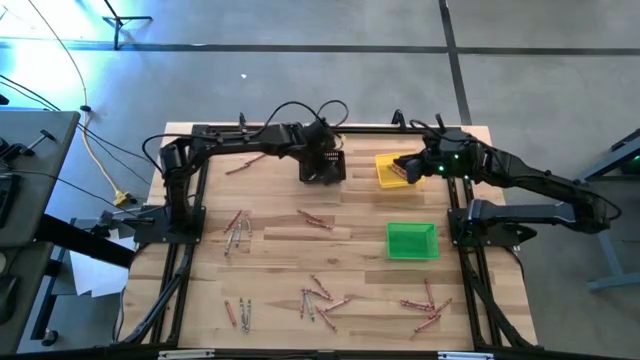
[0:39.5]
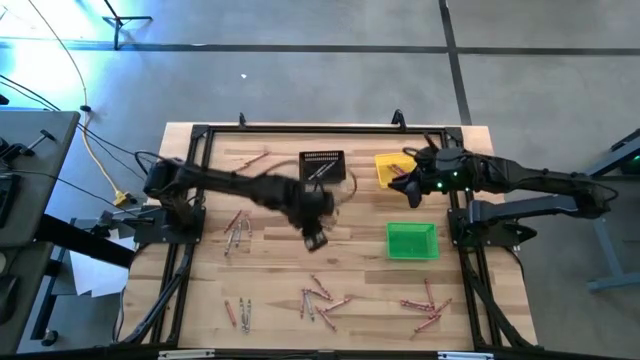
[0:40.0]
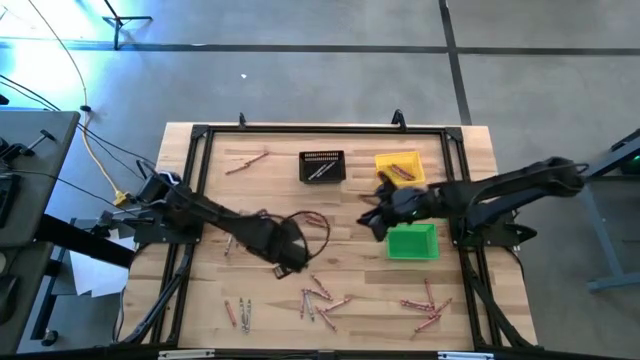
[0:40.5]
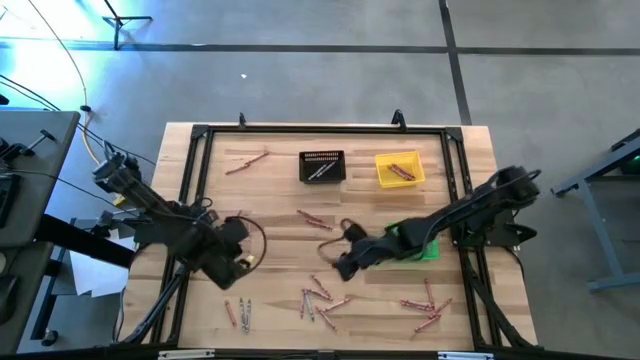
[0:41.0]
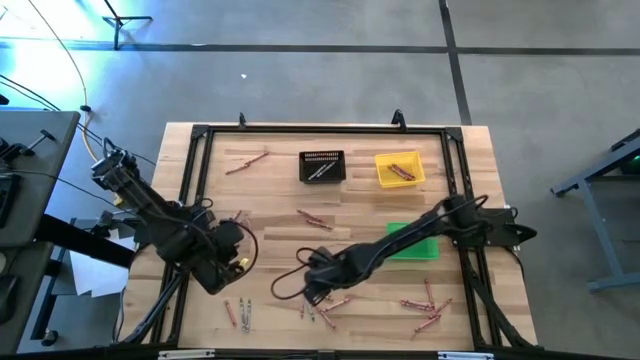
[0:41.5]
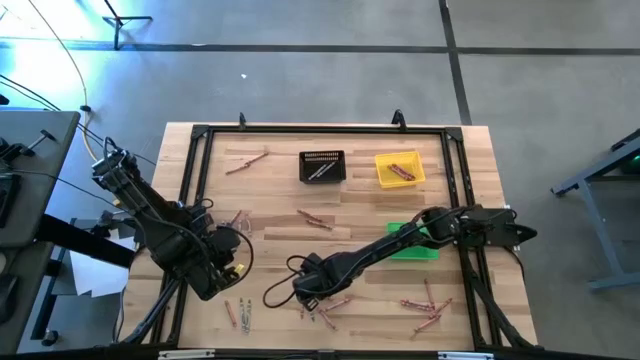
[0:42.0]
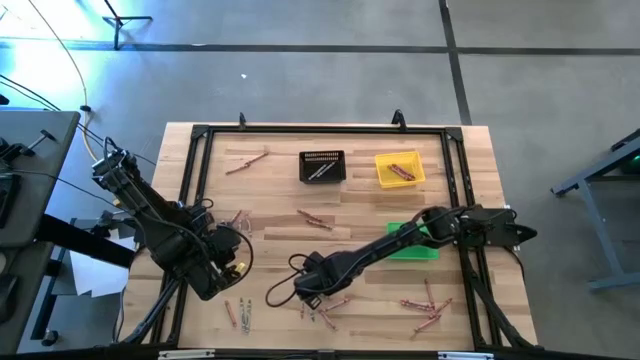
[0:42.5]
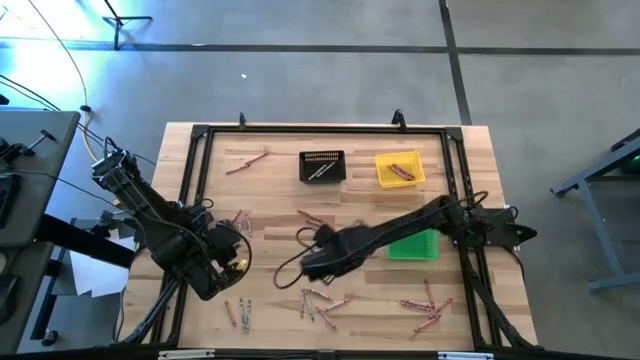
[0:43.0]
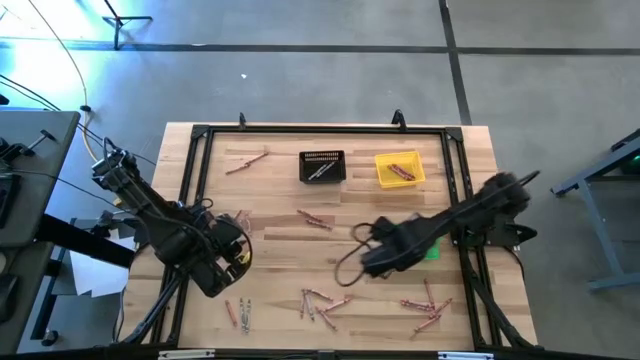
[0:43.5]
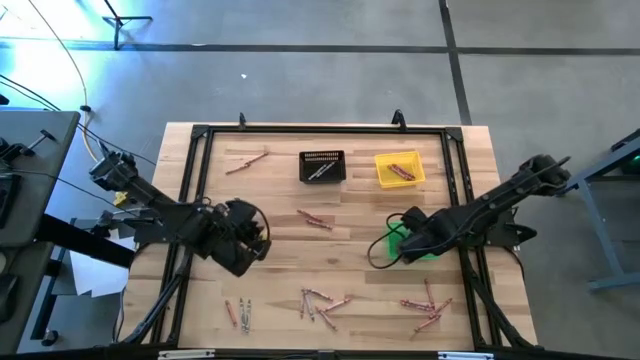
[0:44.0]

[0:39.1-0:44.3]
Task: Sort crayons
Put the pink crayon into the green basket

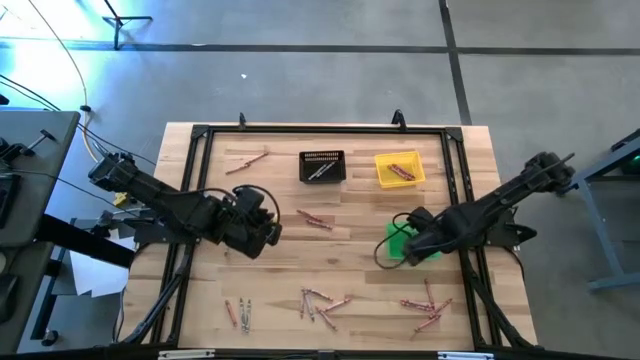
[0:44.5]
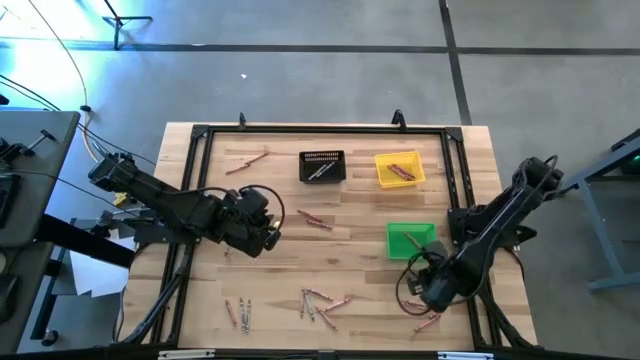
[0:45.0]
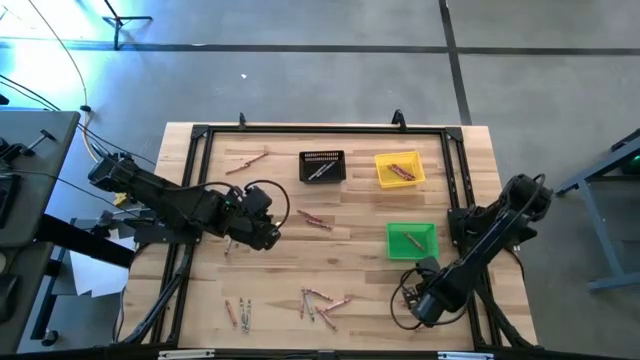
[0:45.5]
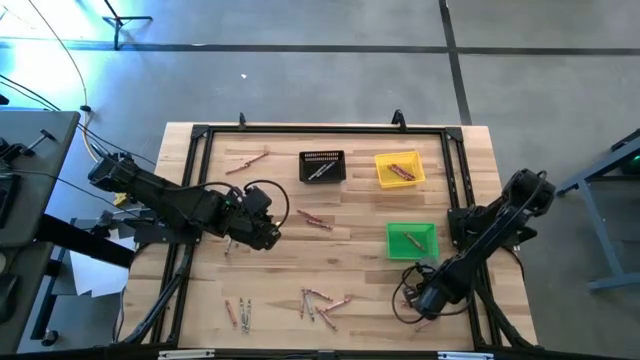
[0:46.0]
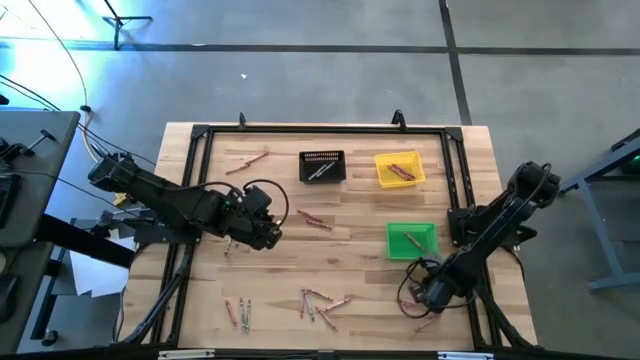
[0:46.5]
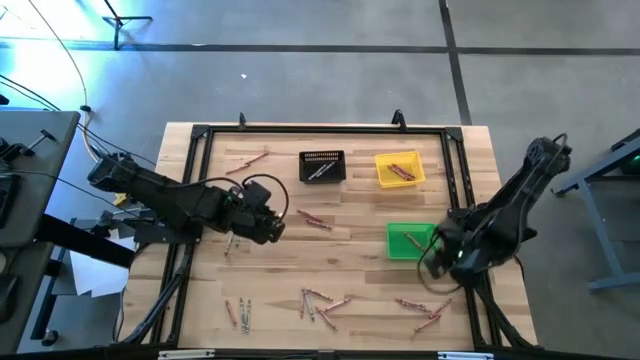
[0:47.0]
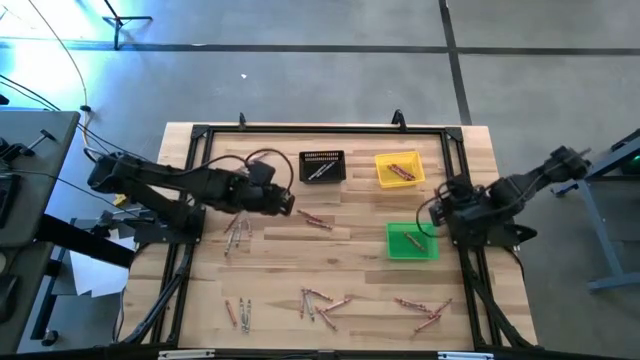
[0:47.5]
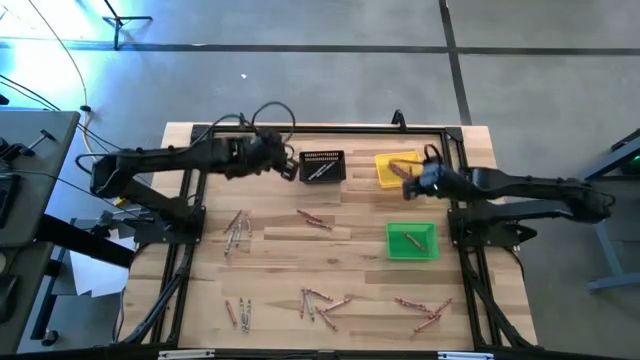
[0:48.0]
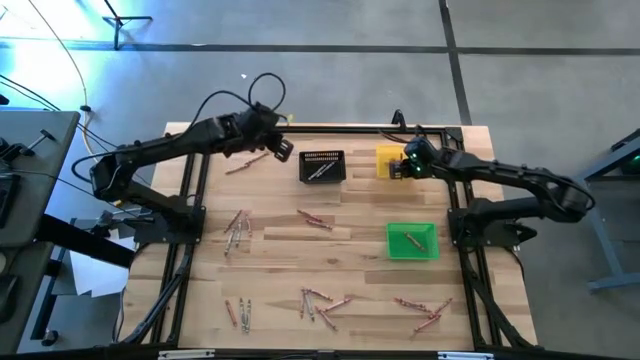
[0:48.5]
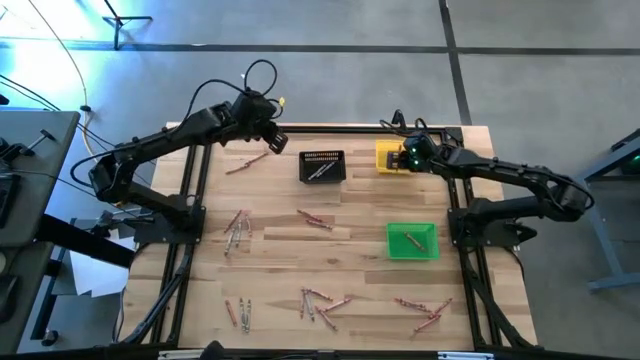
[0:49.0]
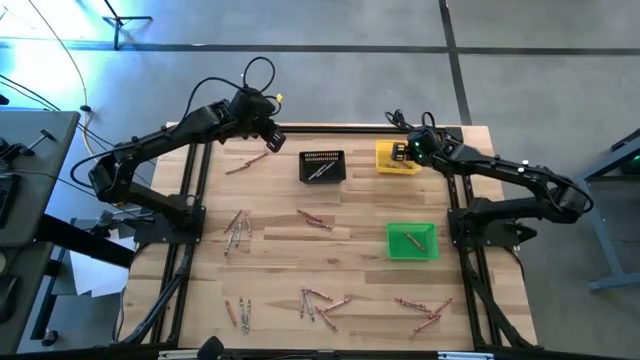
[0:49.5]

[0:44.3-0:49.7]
Put the red crayon into the yellow basket

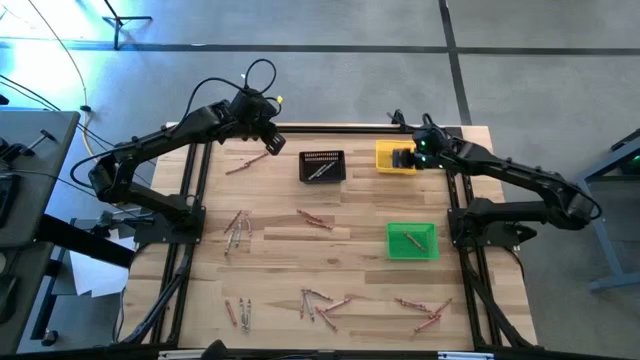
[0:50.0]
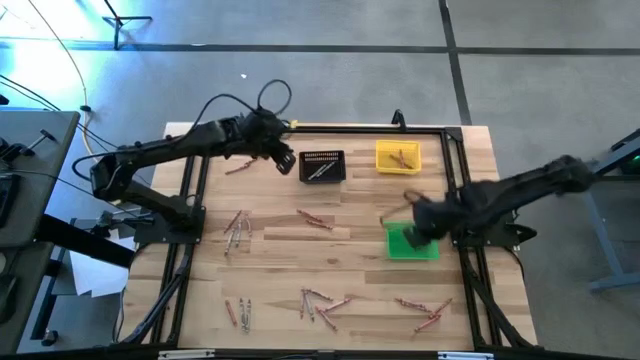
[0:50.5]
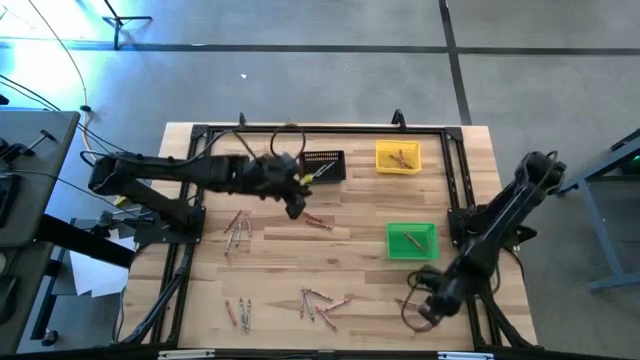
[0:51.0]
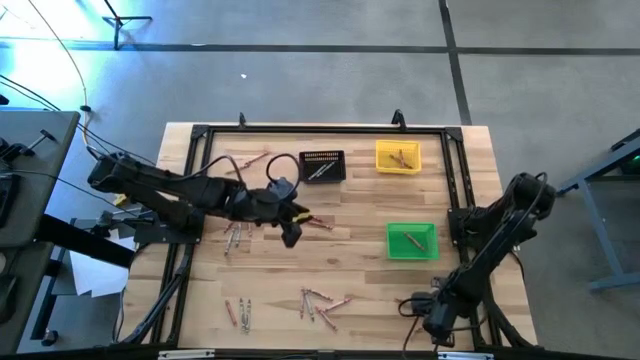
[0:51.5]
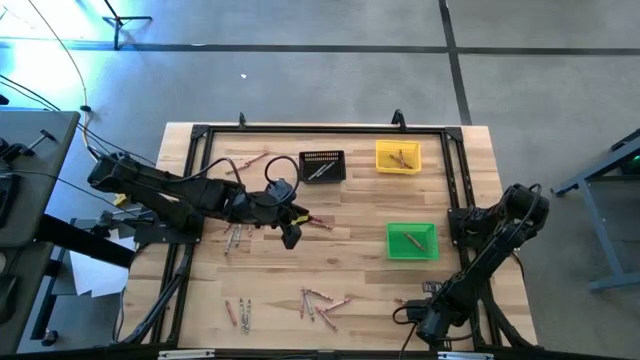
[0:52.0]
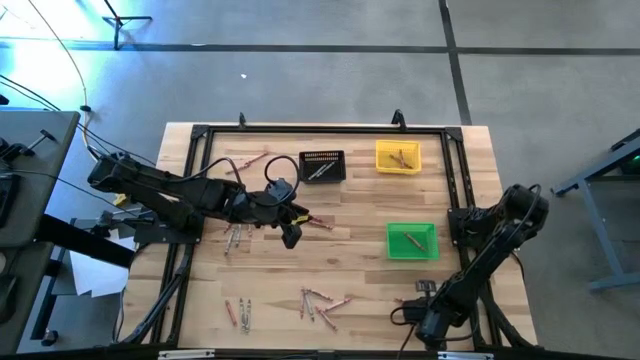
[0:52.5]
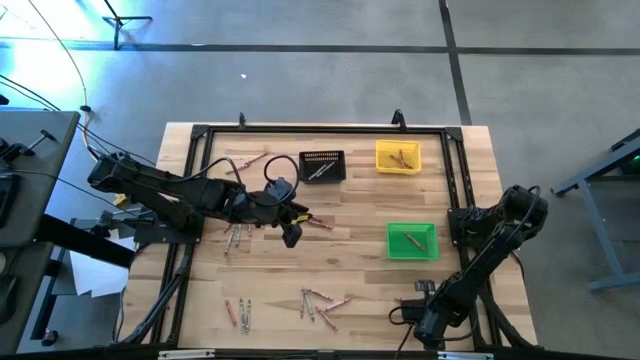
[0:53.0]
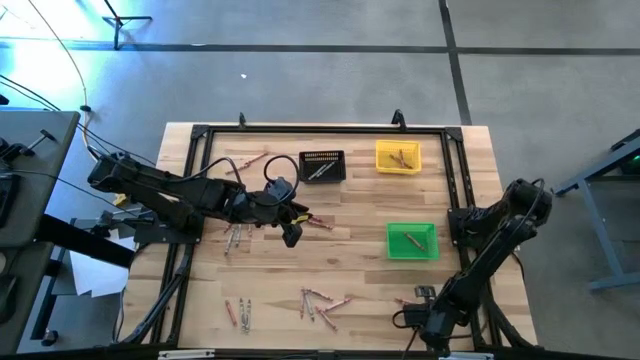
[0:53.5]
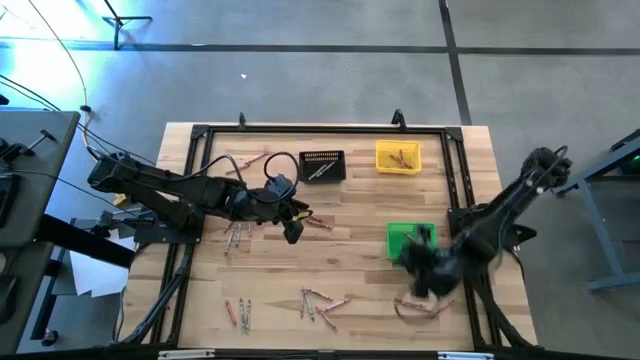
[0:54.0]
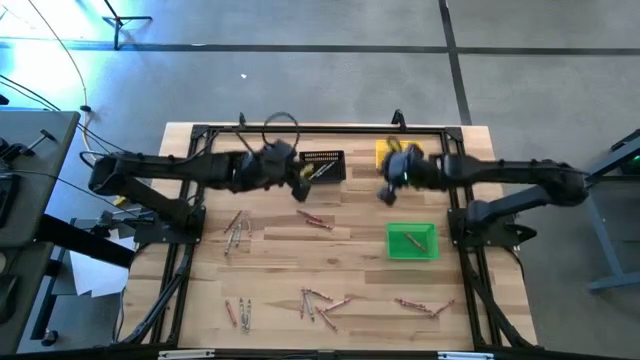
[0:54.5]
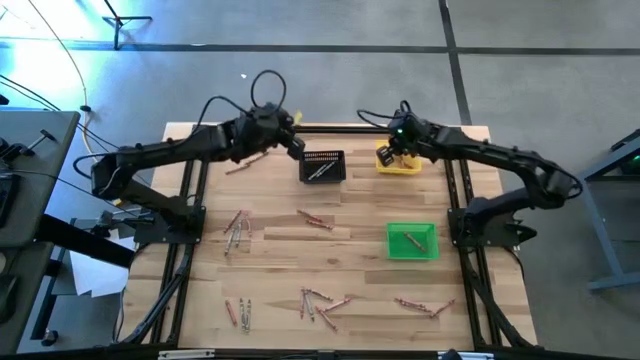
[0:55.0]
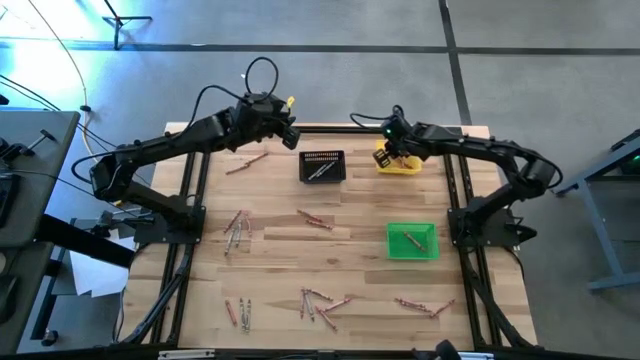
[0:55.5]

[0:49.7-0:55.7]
Put the red crayon into the yellow basket

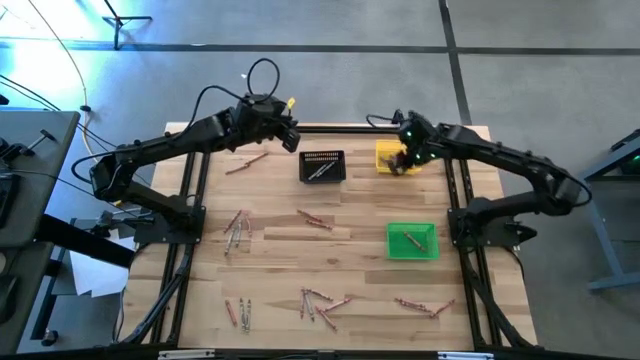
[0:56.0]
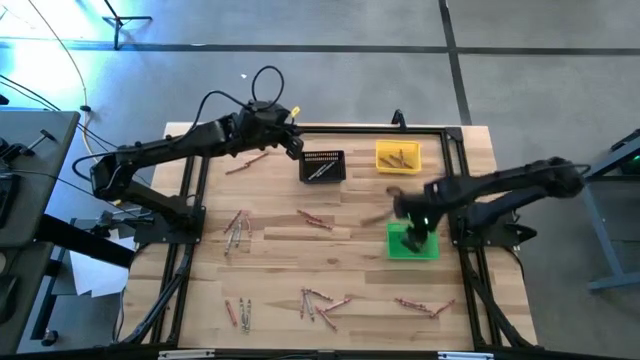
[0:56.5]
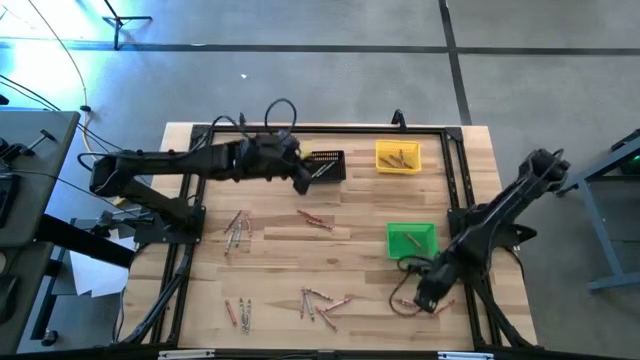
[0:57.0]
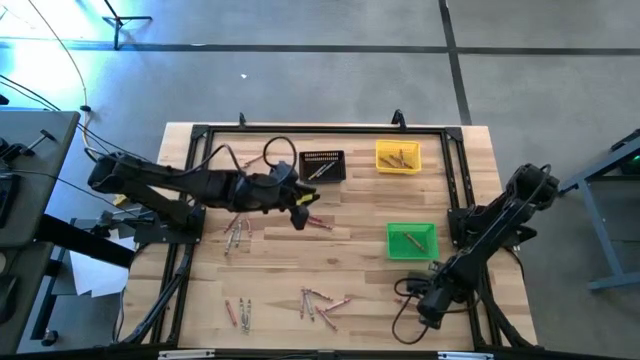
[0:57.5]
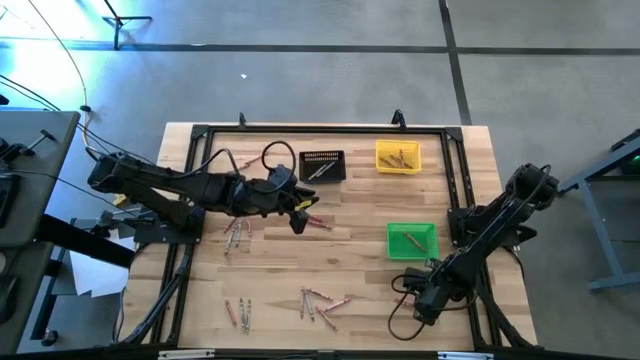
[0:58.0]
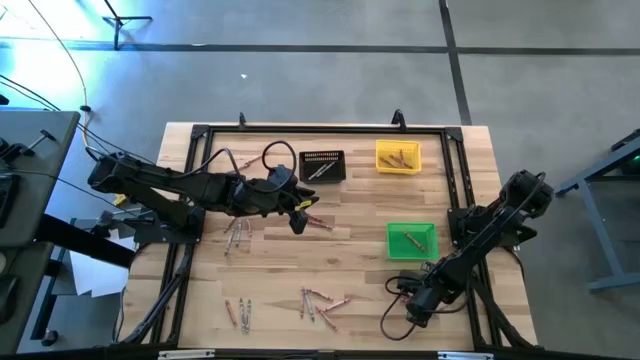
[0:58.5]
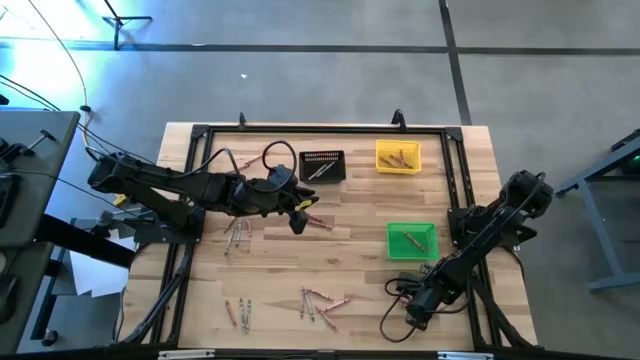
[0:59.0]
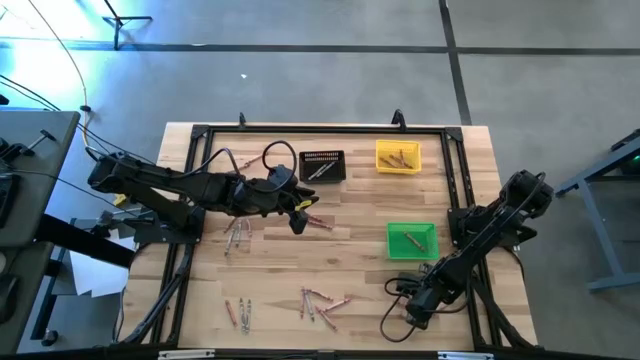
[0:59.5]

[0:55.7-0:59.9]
Put the pink crayon into the green basket

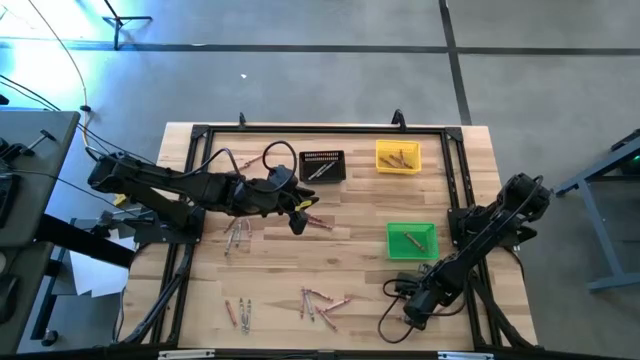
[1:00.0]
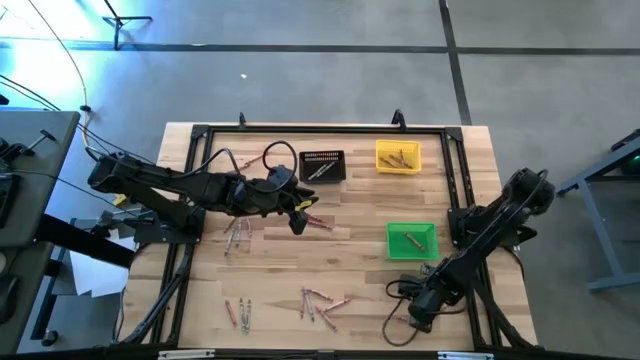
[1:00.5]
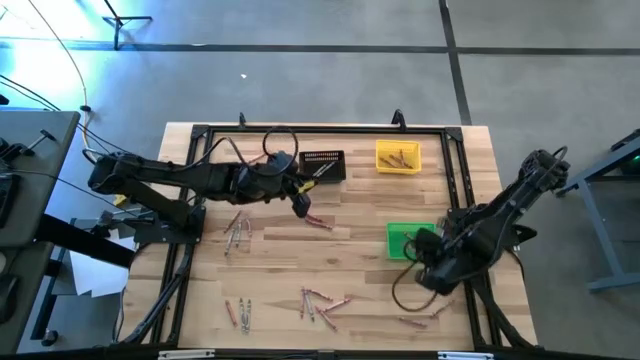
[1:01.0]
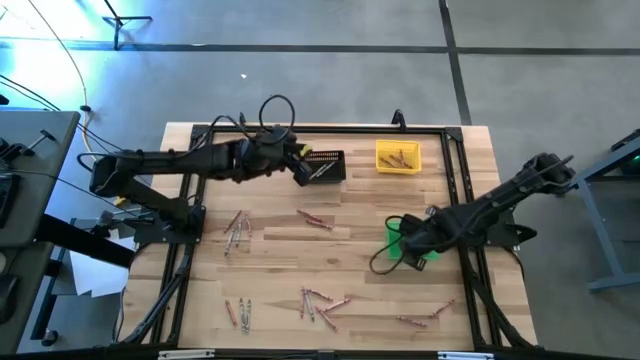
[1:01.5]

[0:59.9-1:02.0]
Put the pink crayon into the green basket
